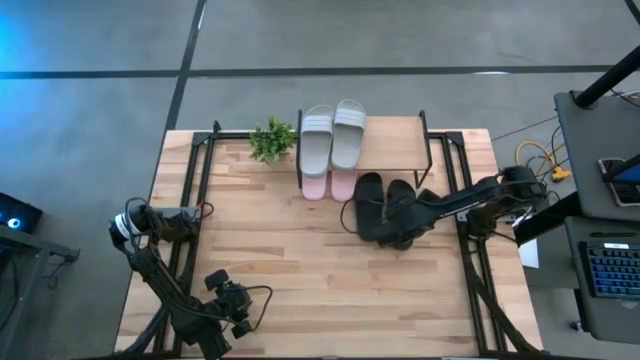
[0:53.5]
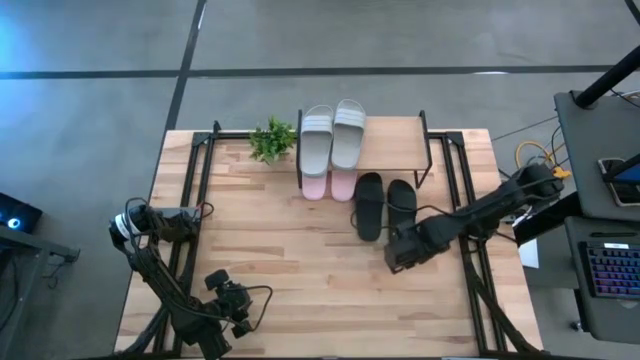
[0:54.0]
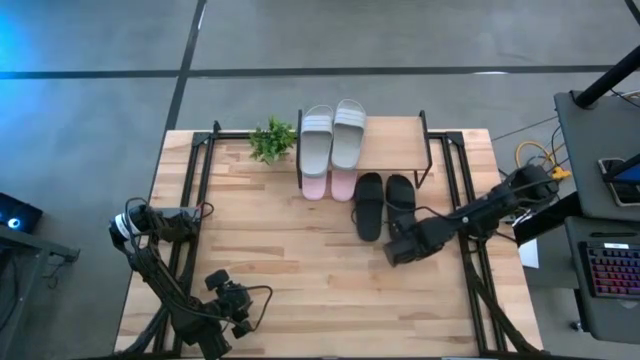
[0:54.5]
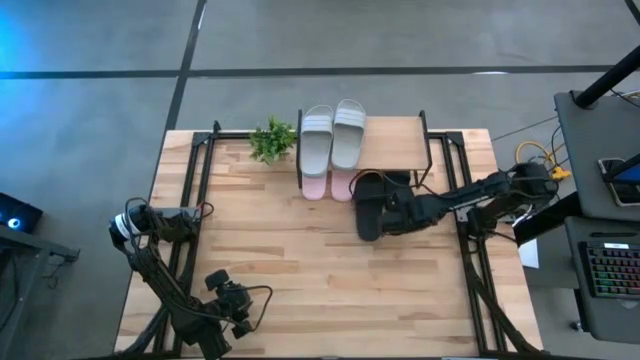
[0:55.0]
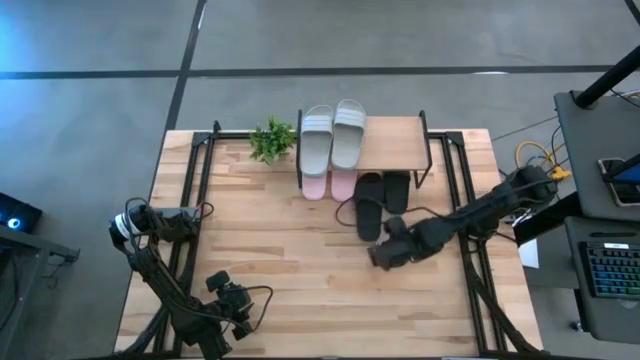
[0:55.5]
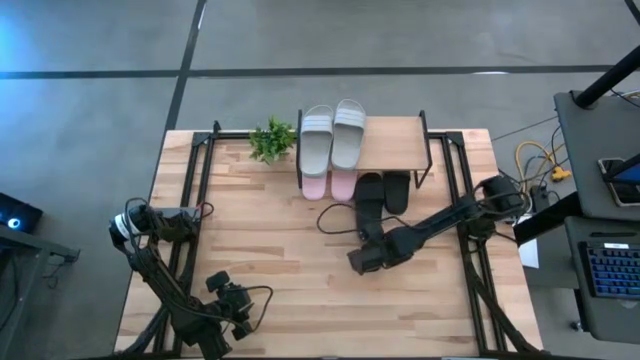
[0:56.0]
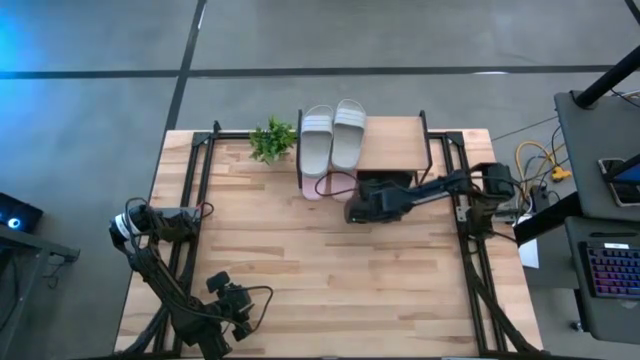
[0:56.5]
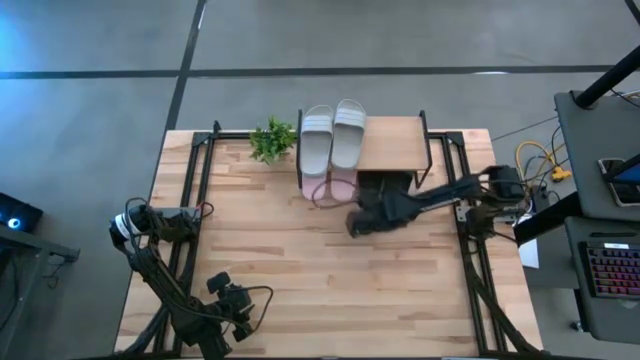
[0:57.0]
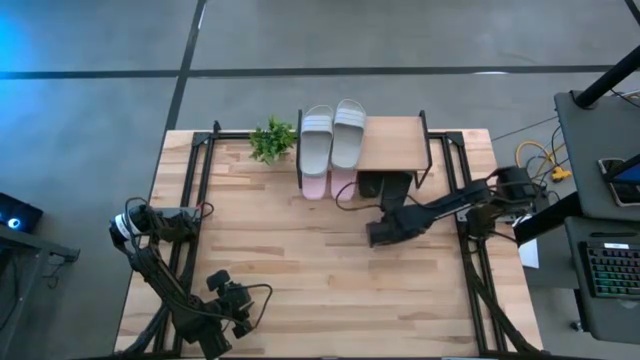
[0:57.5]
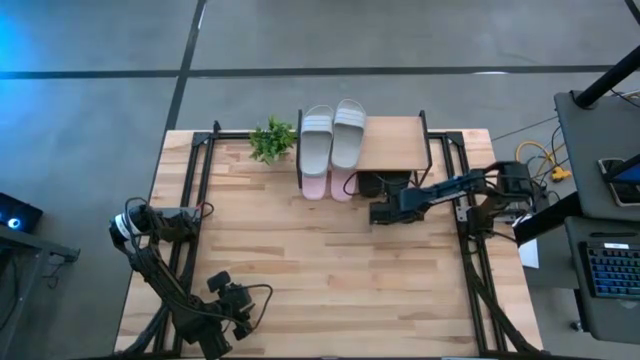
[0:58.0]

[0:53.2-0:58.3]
Task: Pick and place slides into the shelf
Adjust the right black slides under the shelf

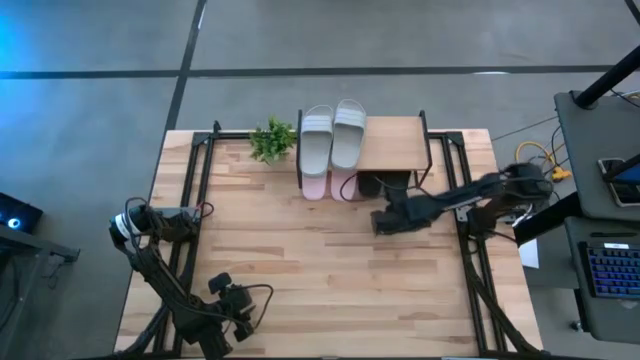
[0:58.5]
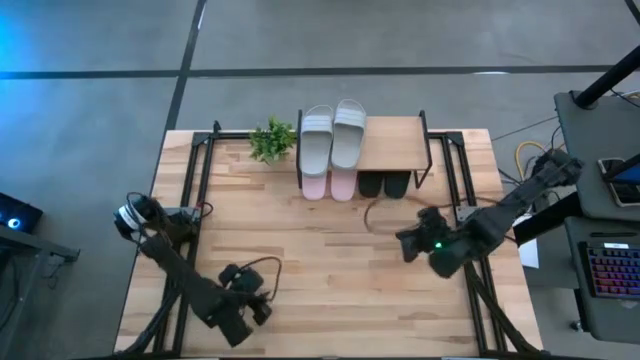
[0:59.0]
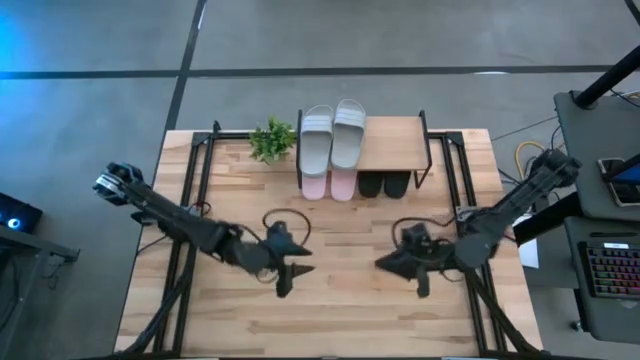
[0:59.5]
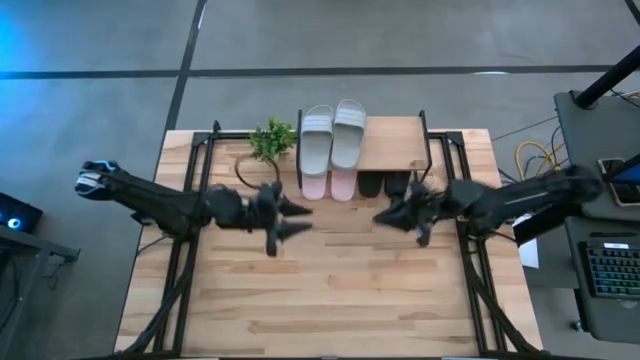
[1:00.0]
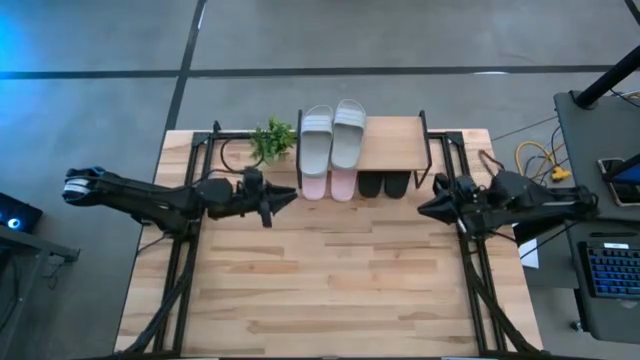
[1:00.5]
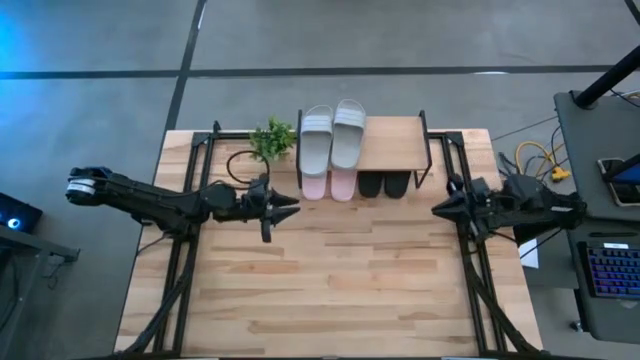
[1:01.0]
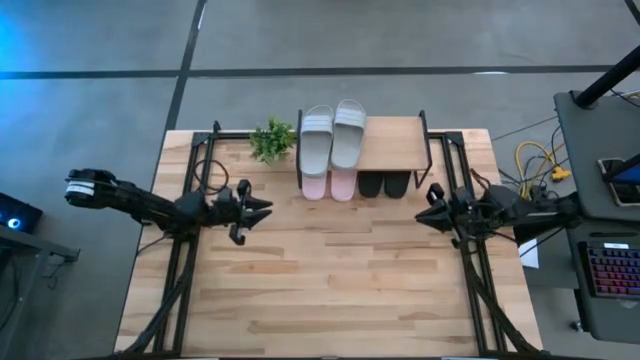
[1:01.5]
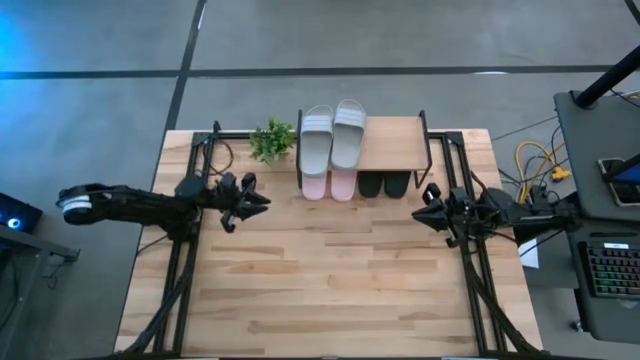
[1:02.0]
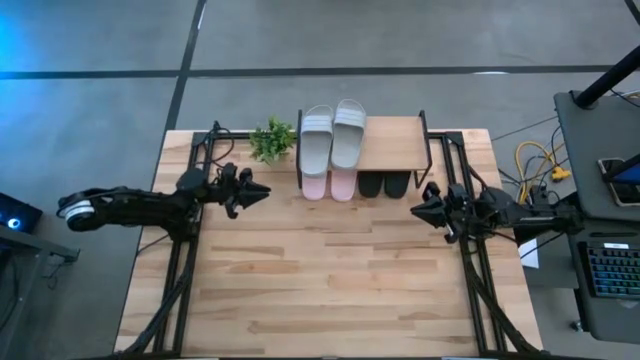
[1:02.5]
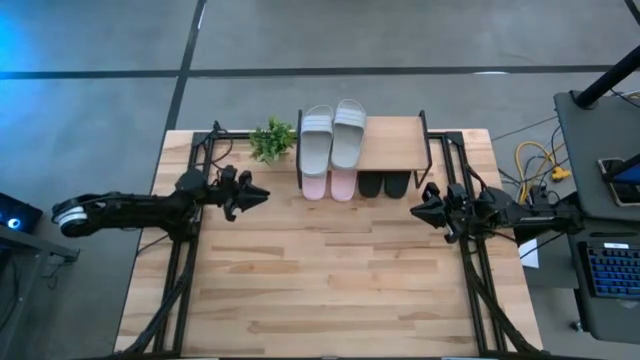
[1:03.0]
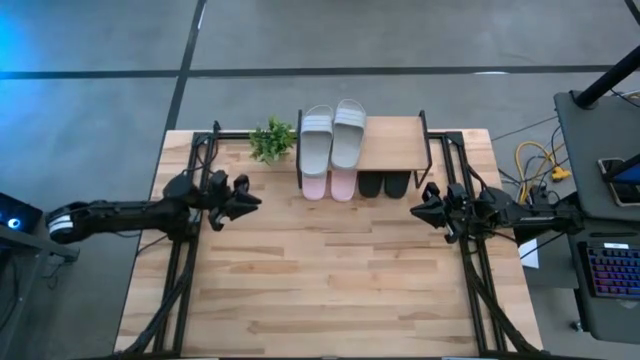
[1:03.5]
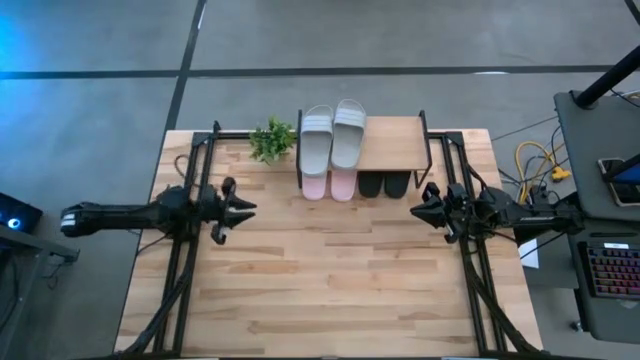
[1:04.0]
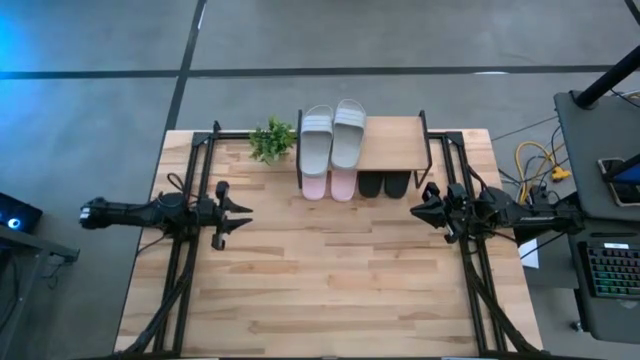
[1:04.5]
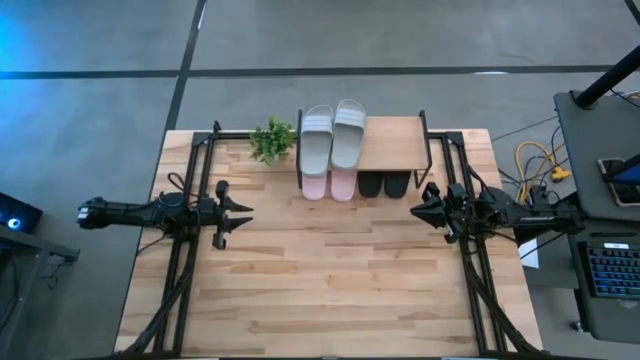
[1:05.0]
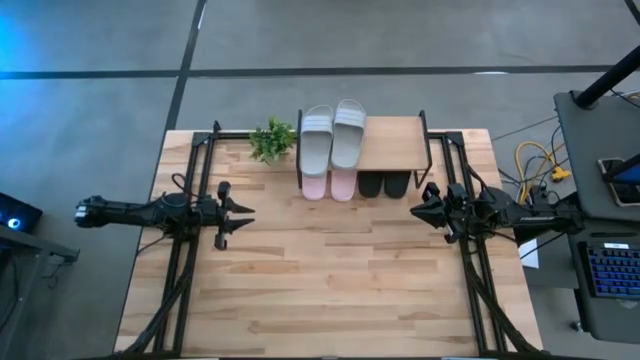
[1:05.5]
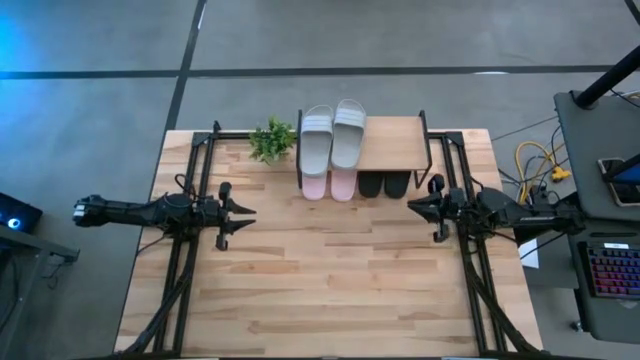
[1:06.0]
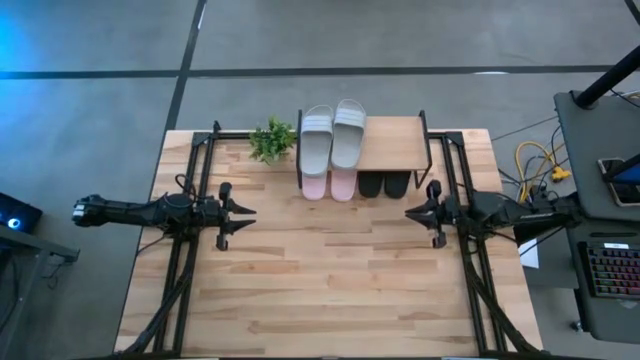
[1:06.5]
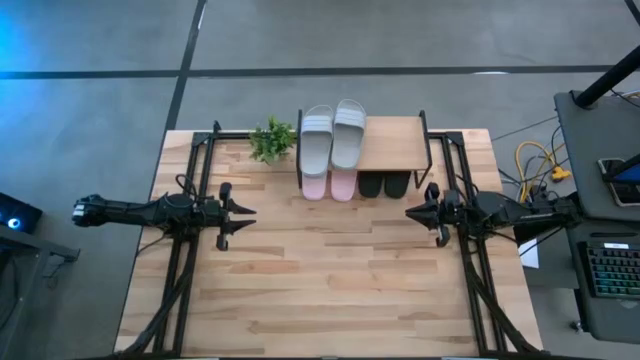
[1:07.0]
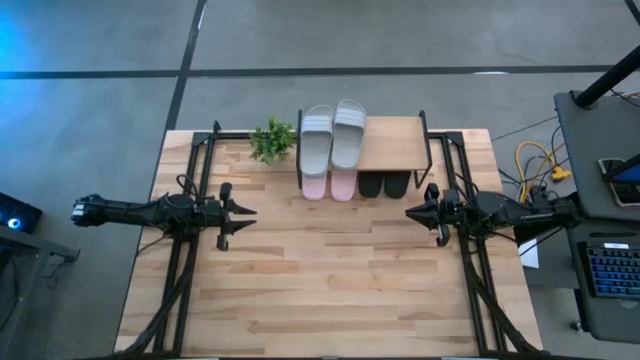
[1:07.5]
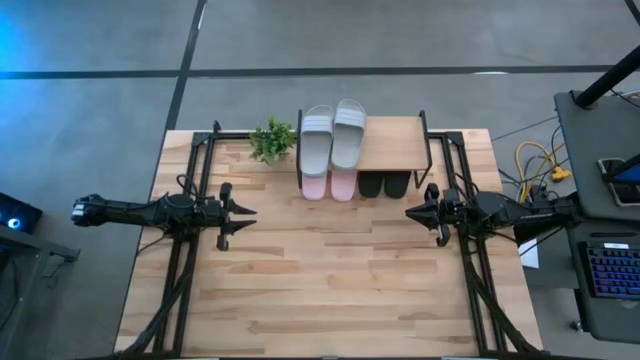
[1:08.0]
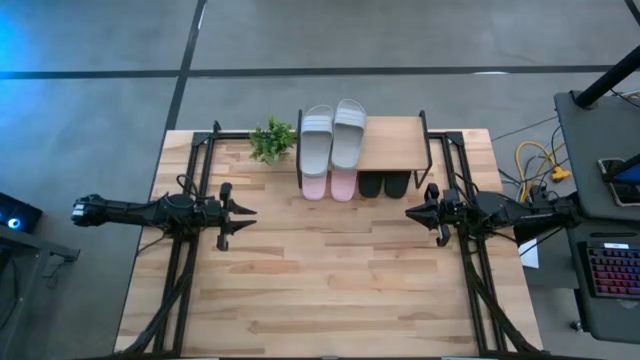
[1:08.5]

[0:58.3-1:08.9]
Return to Home Position

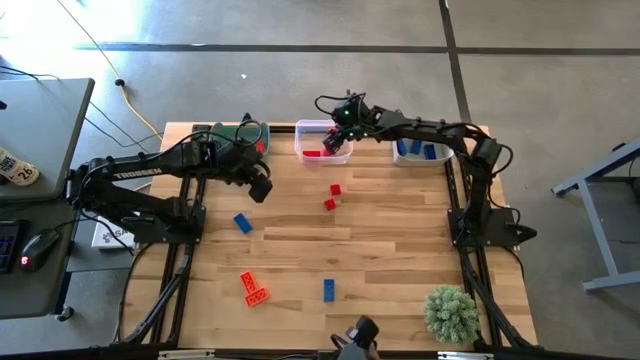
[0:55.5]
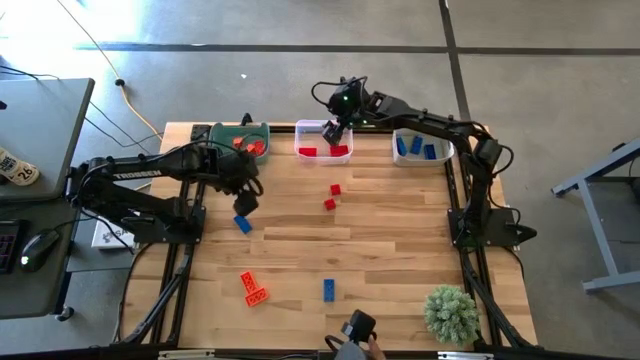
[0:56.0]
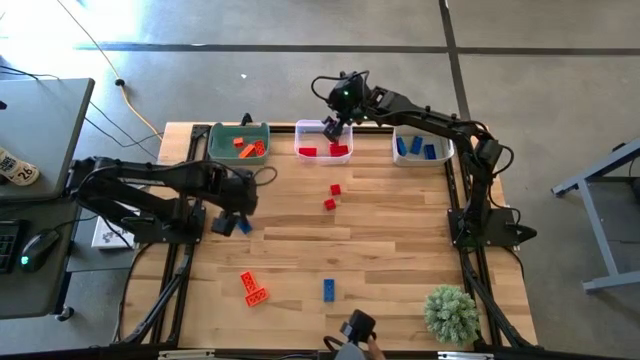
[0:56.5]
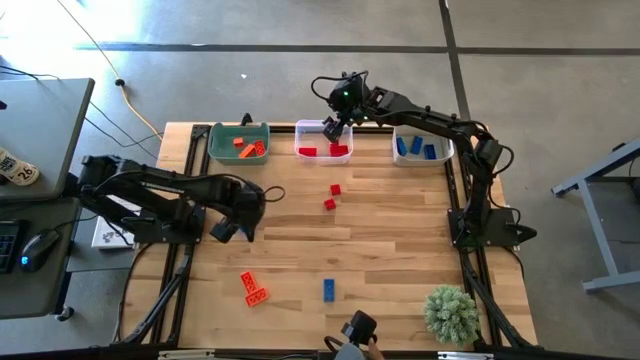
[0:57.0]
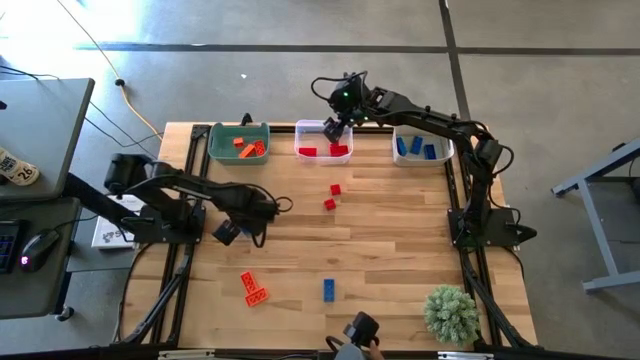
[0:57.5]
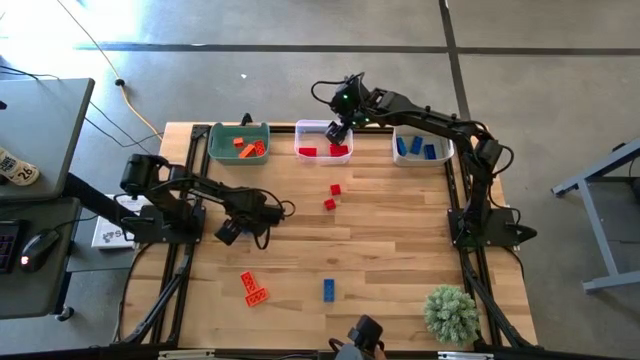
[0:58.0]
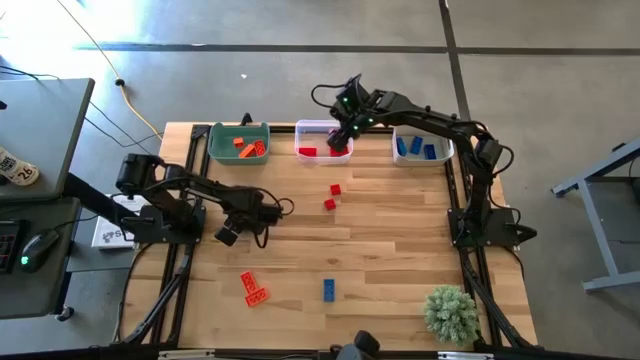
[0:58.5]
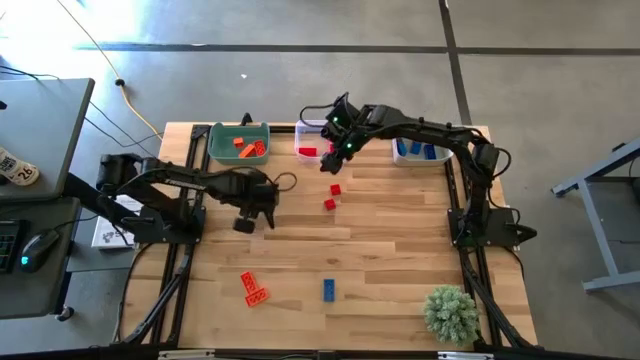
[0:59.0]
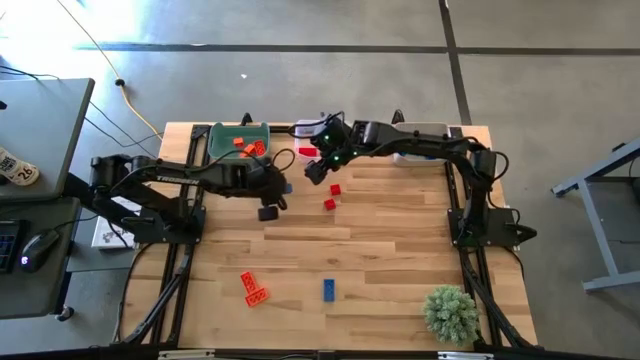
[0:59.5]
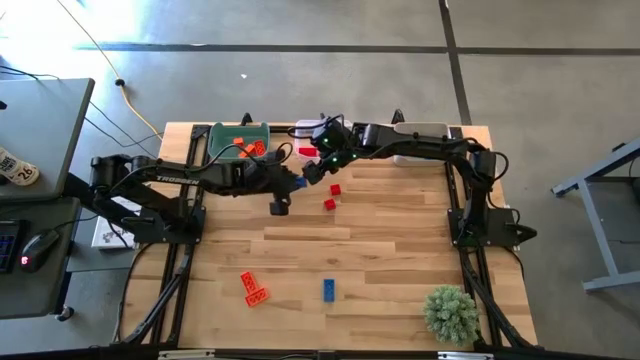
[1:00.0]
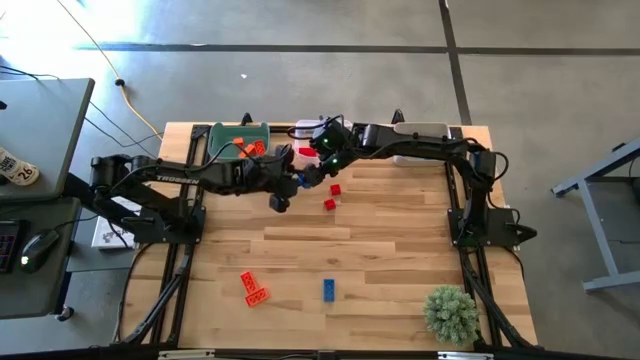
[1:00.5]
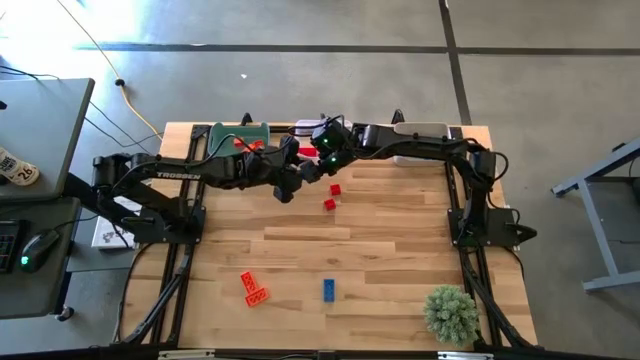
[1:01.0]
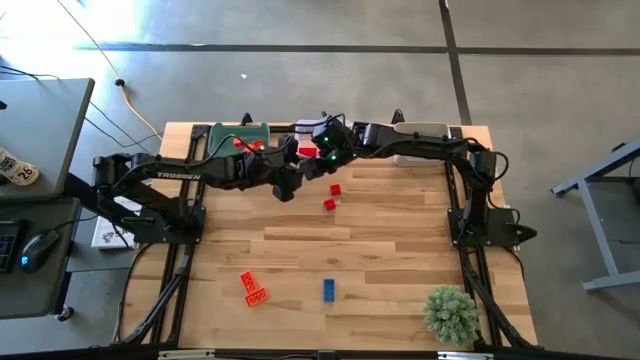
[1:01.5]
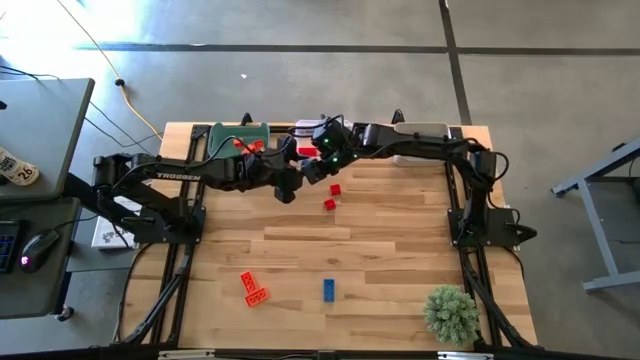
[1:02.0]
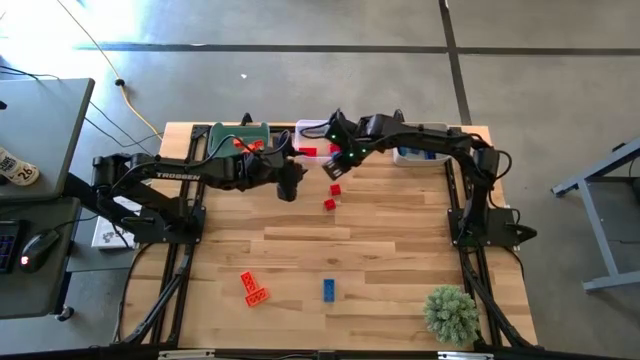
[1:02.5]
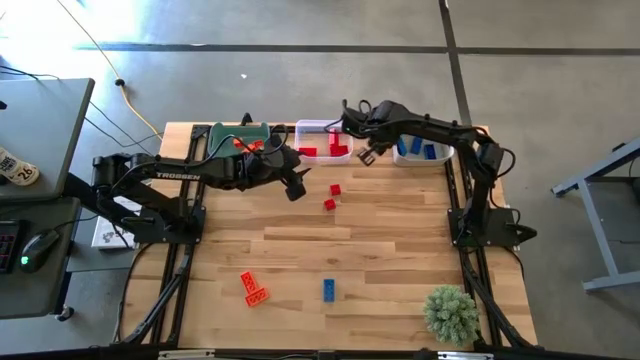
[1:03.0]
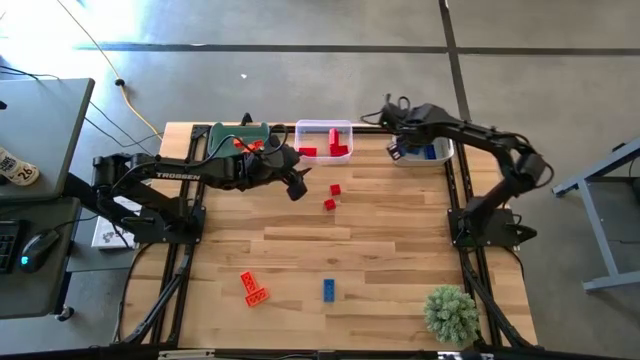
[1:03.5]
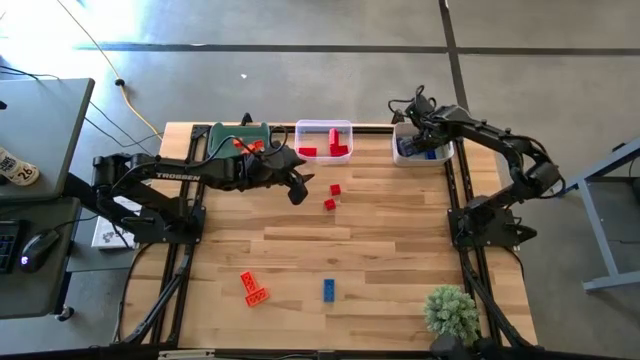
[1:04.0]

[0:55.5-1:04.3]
Task: Sort & place blocks by color
Put the blue game piece into the white bin
